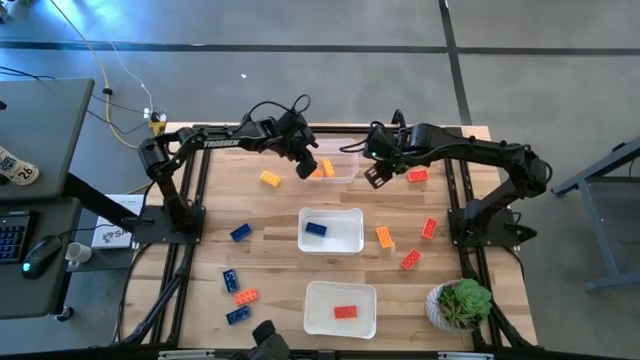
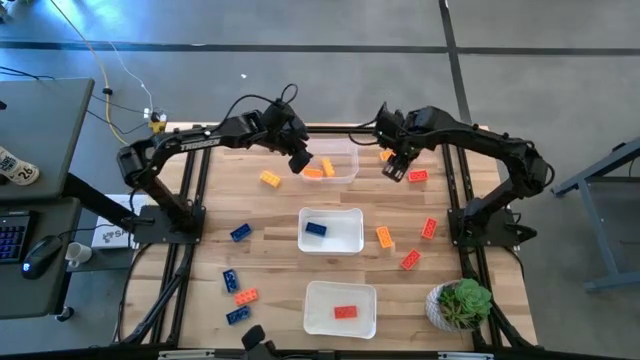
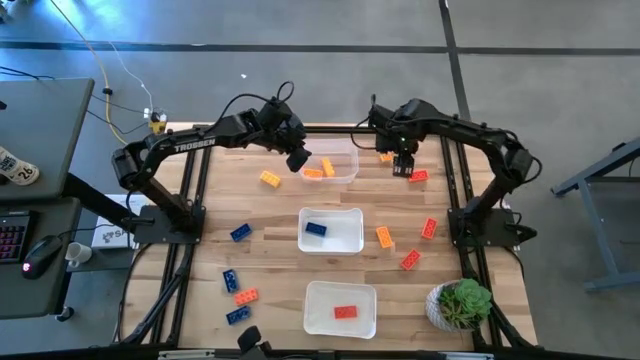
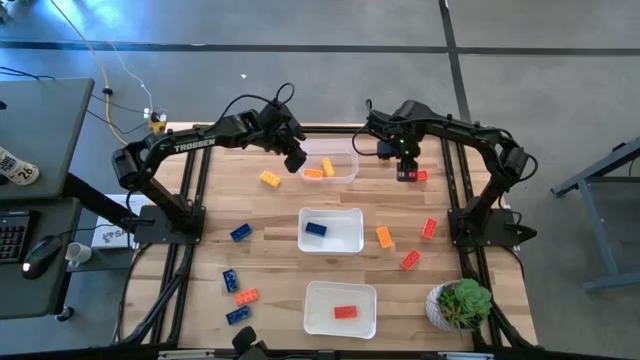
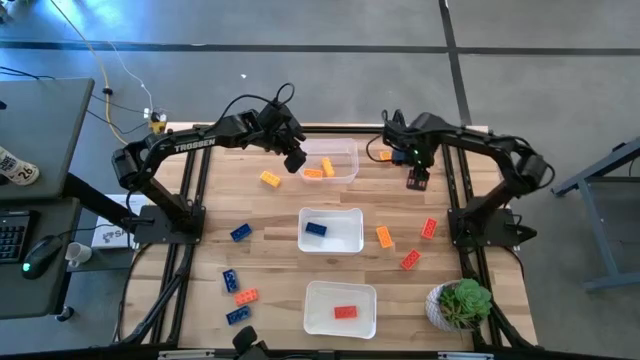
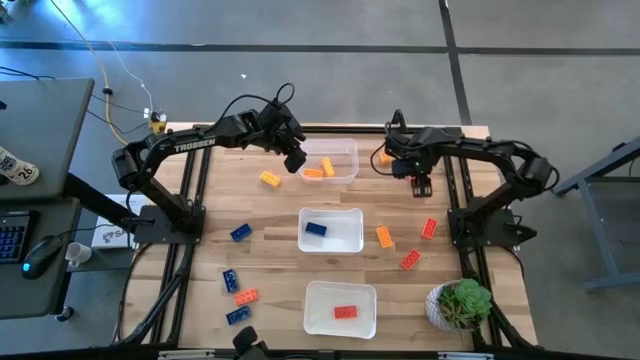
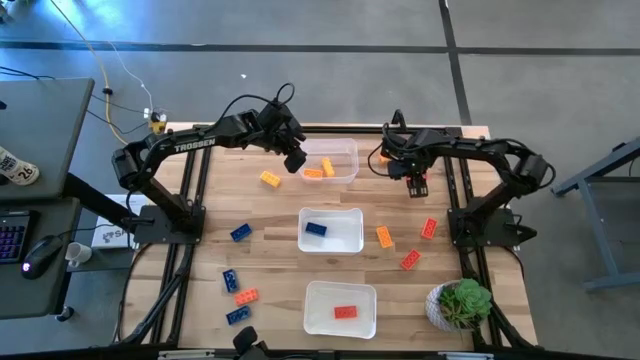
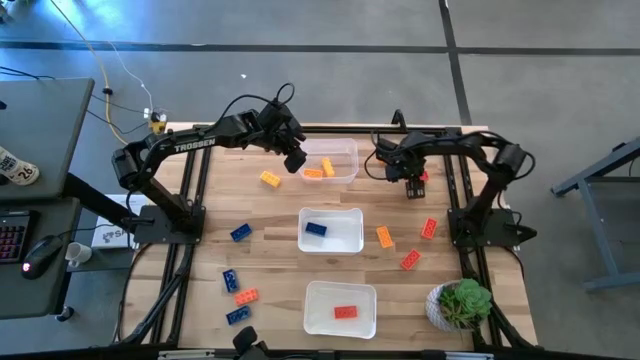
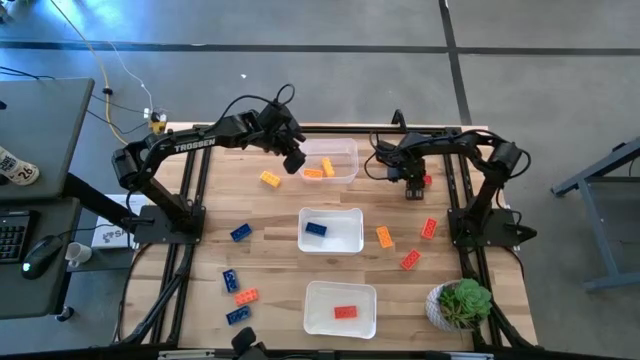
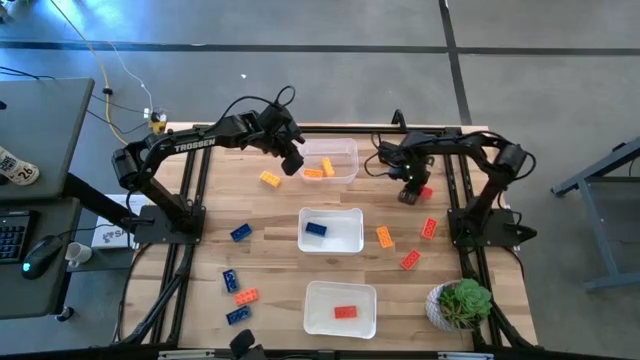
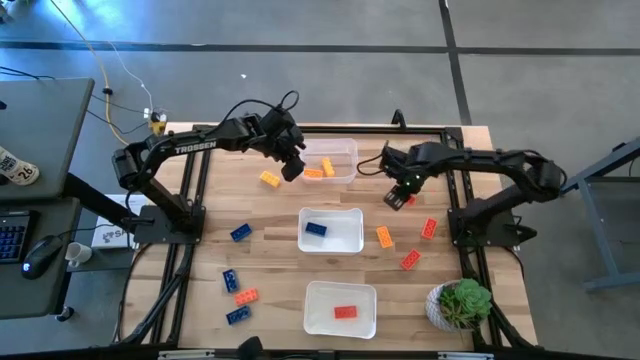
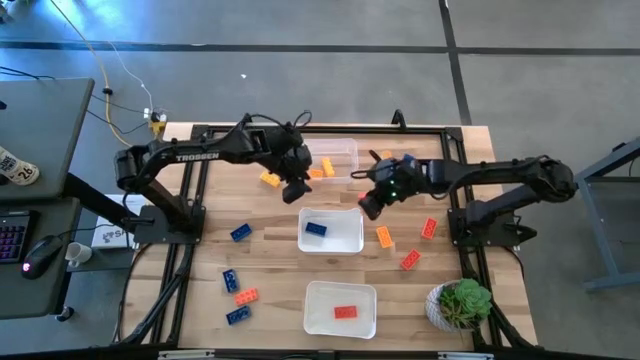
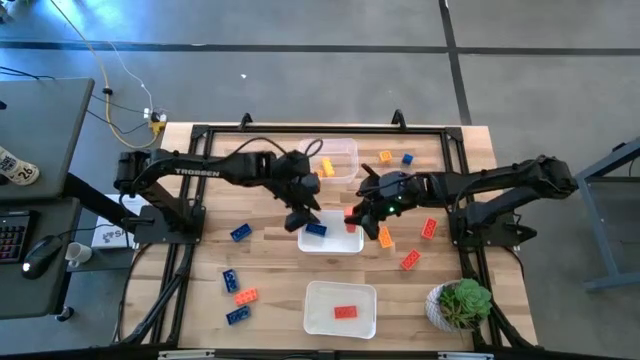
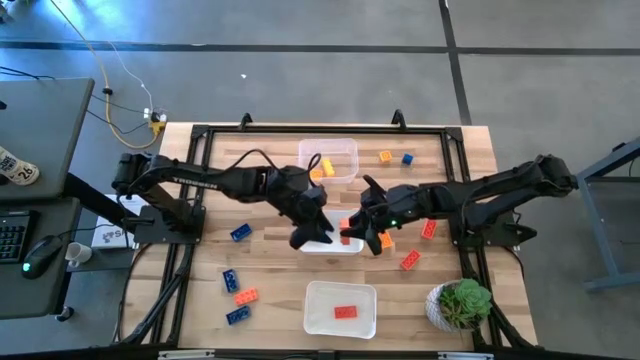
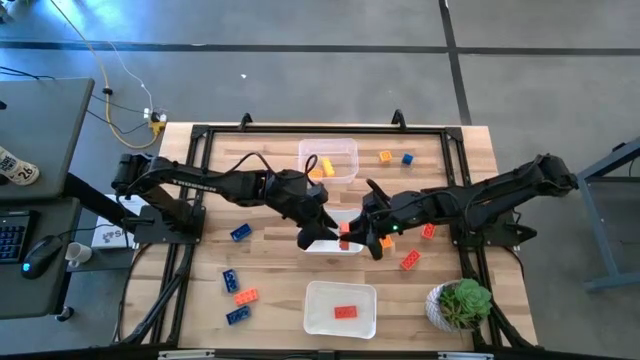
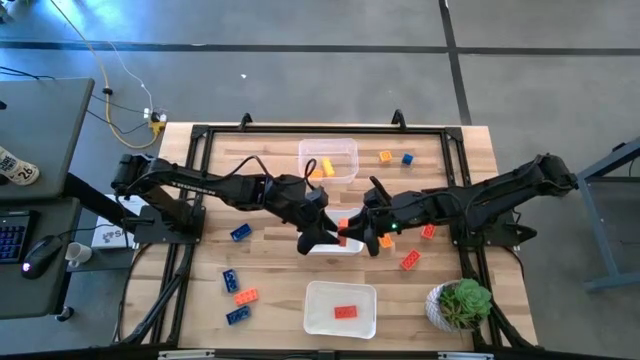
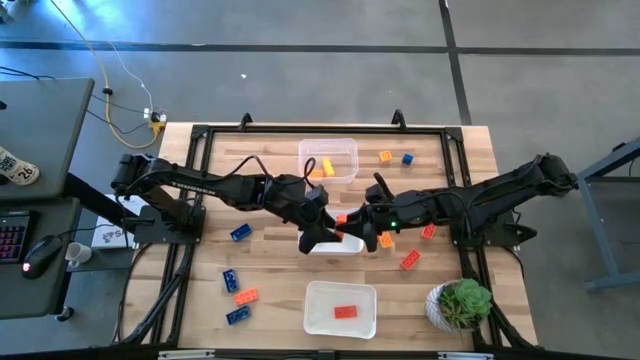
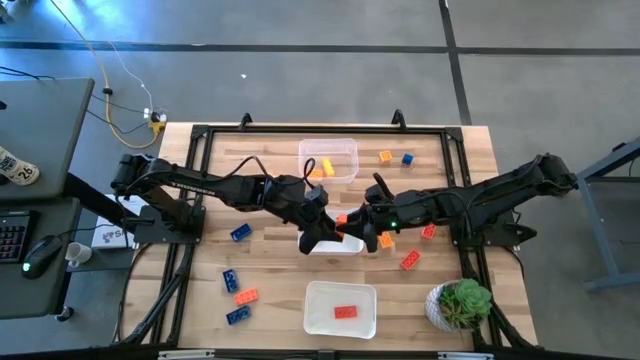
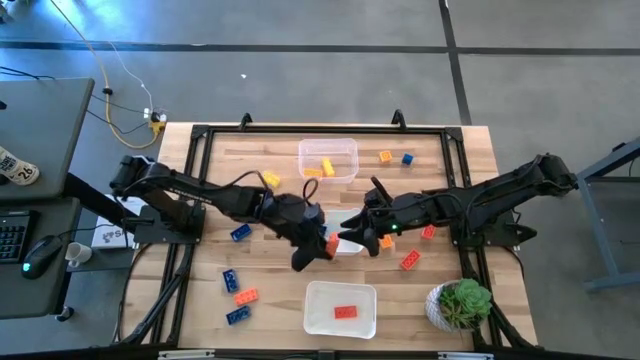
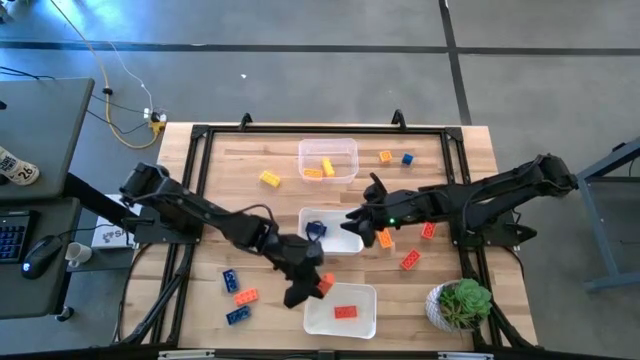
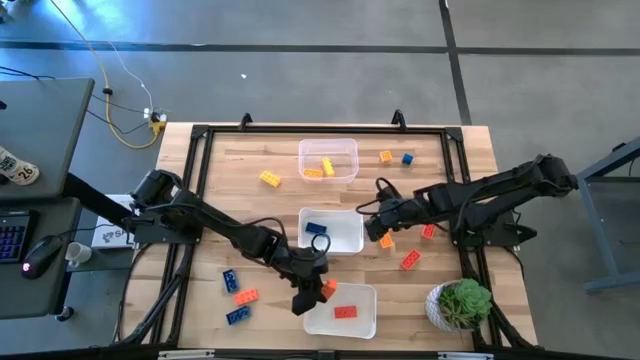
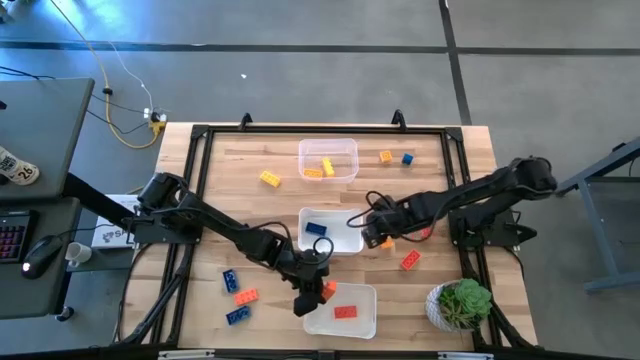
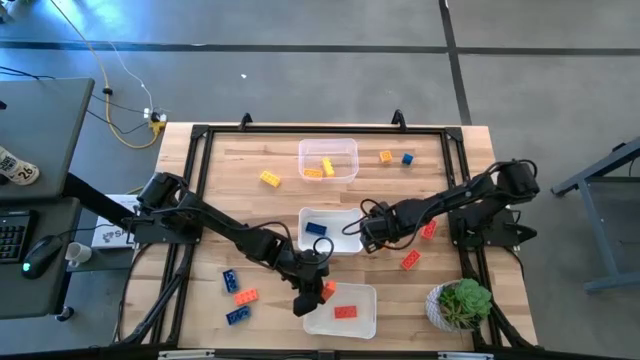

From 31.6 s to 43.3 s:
Task: Sort & place blocks by color
Put the orange game piece into the bottom white bin

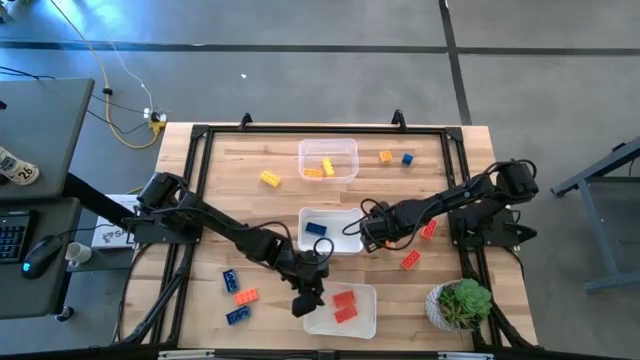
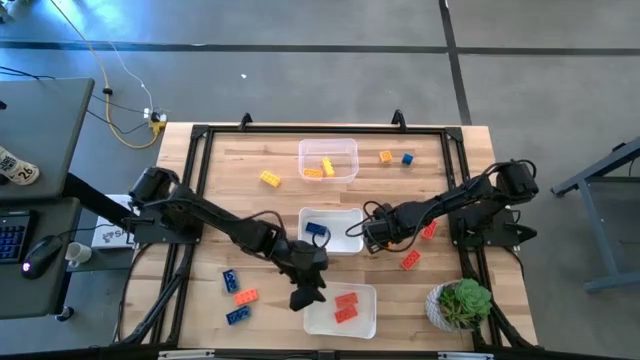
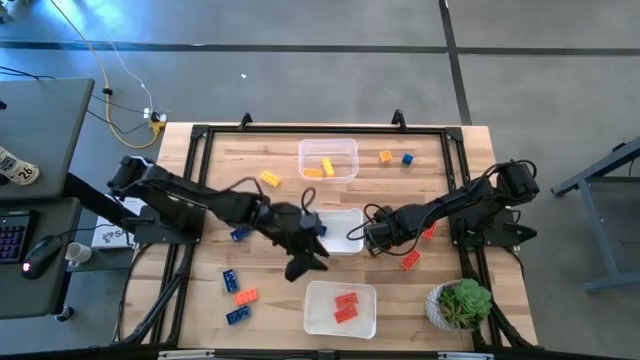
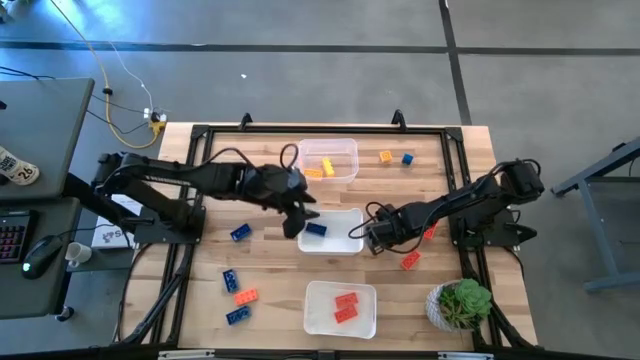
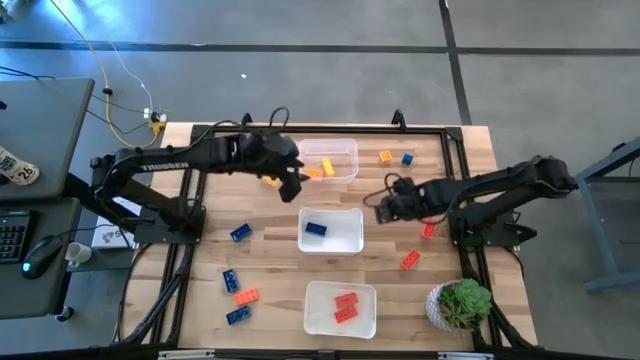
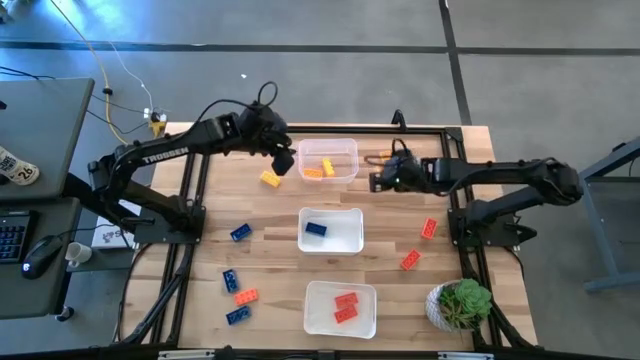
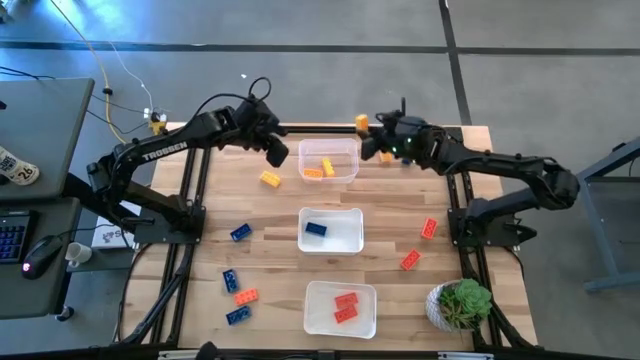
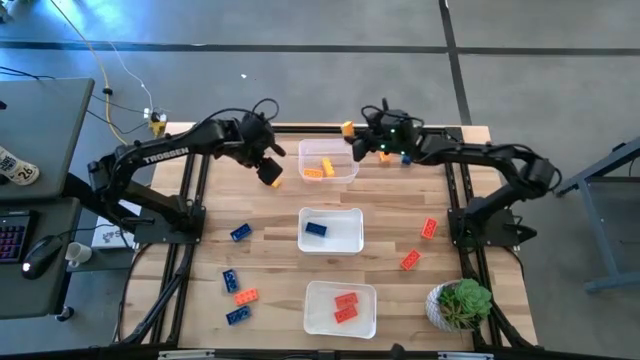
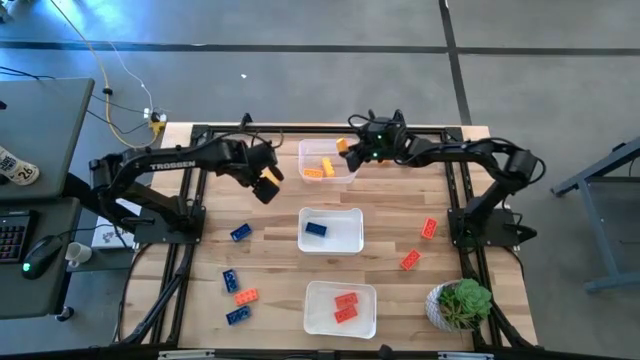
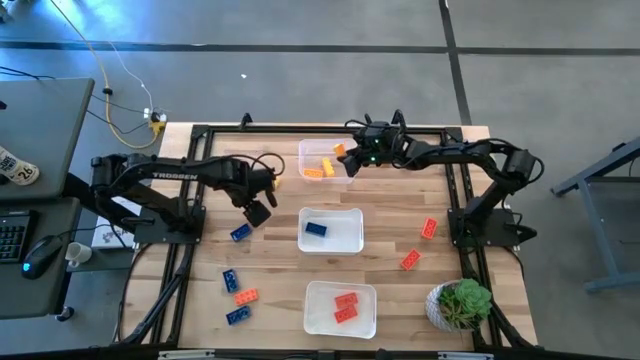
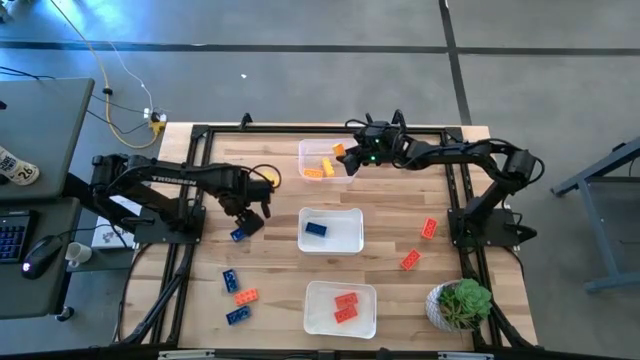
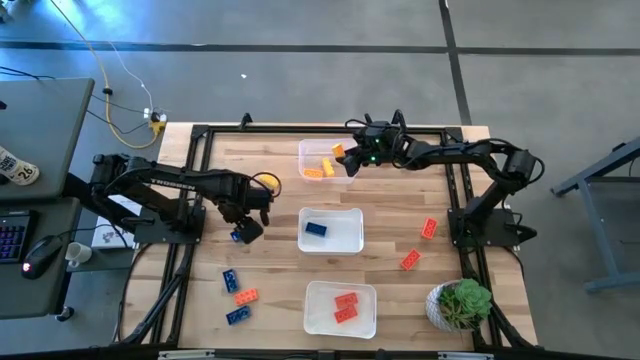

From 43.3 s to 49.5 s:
Put the yellow game piece into the transparent bin

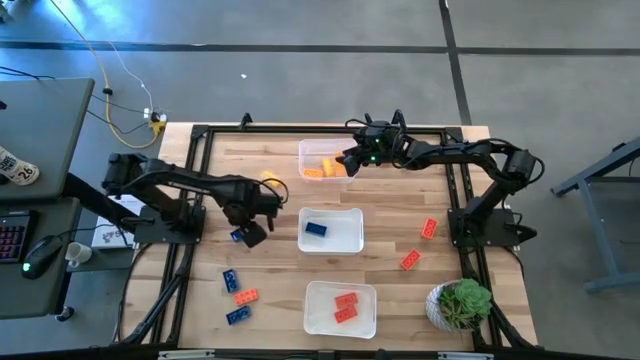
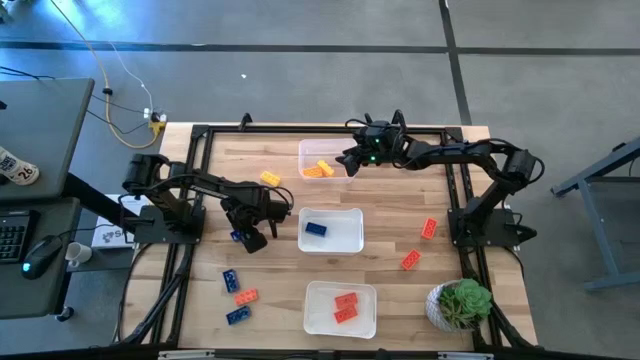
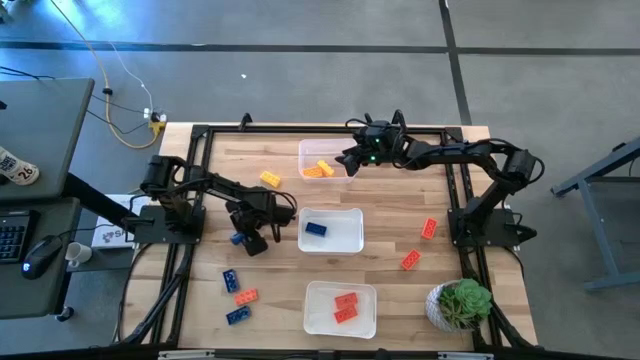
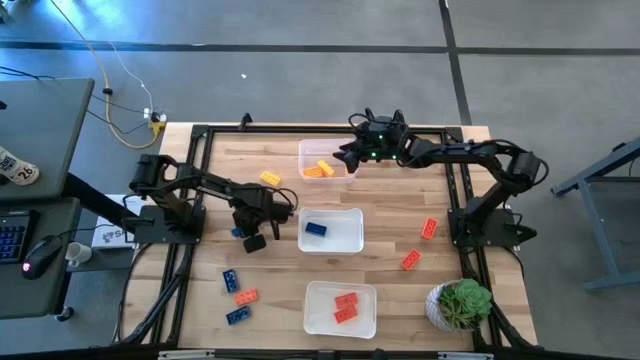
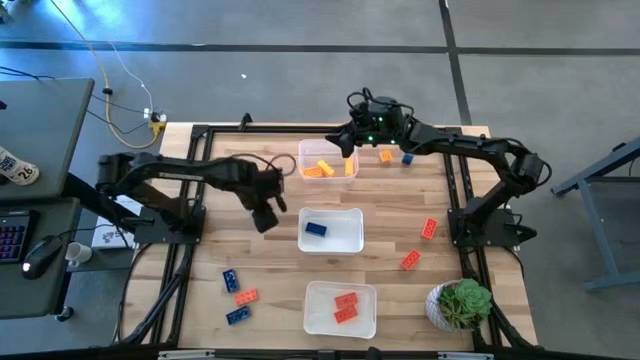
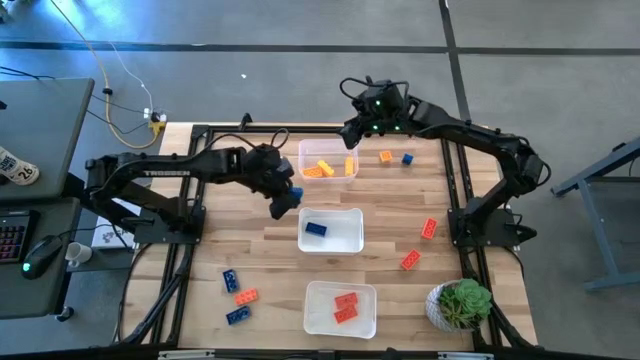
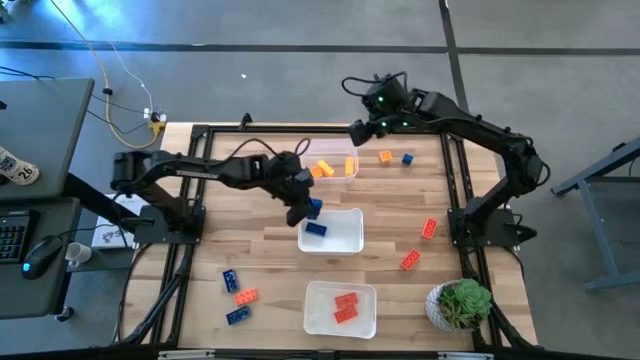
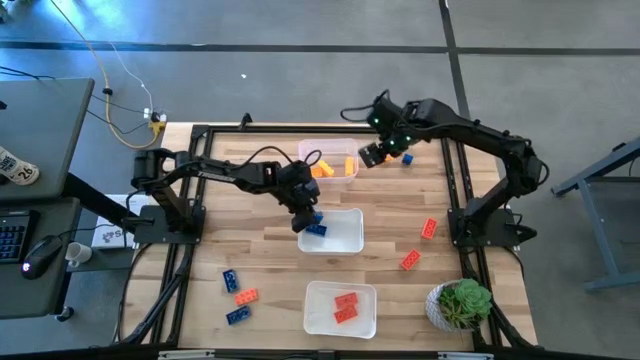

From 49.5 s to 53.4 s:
Put the blue game piece into the top white bin
